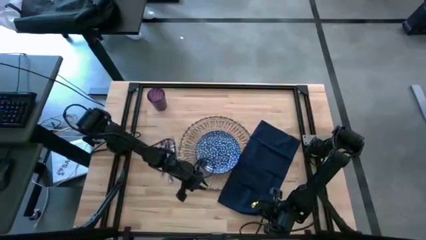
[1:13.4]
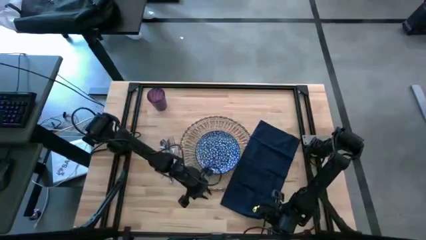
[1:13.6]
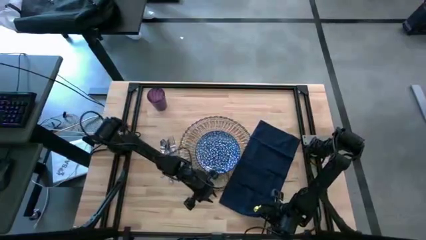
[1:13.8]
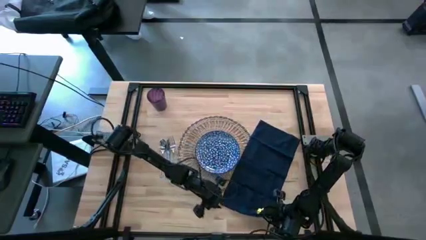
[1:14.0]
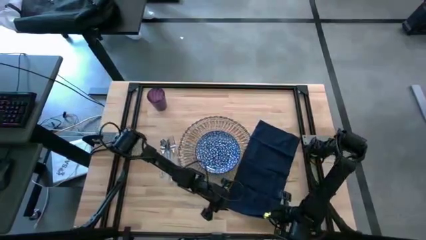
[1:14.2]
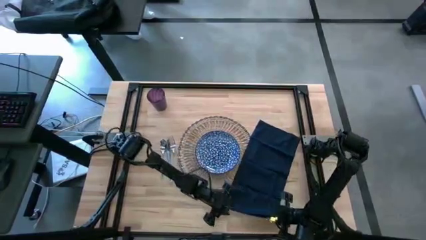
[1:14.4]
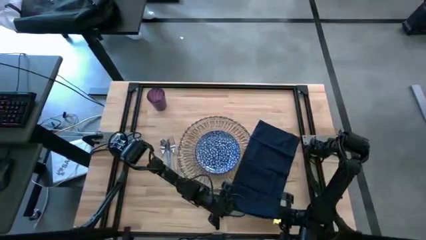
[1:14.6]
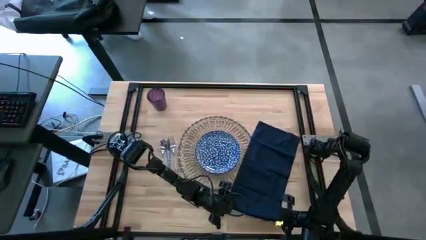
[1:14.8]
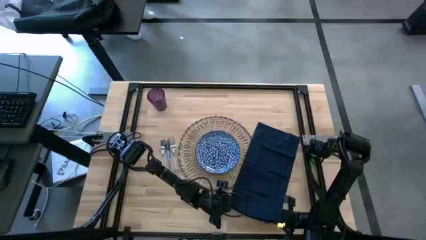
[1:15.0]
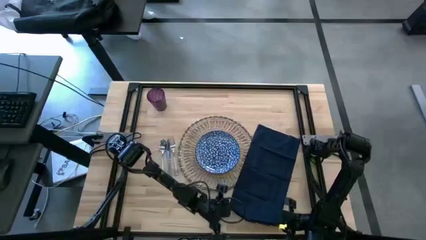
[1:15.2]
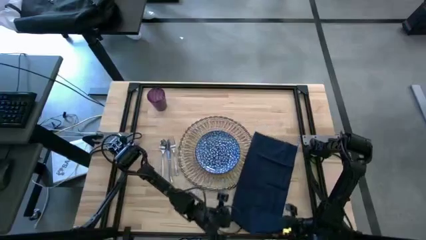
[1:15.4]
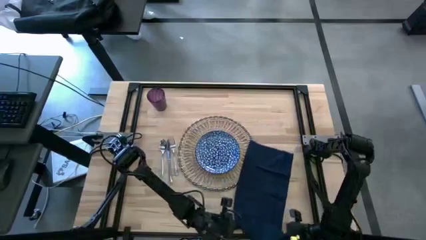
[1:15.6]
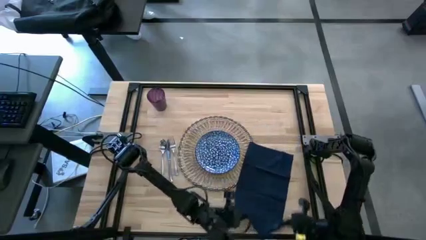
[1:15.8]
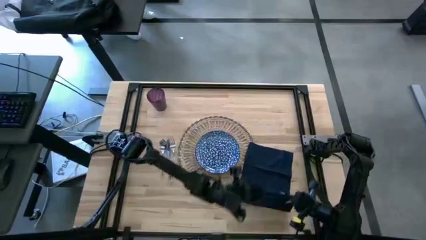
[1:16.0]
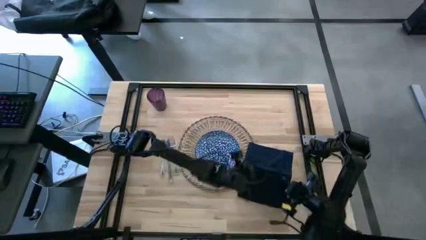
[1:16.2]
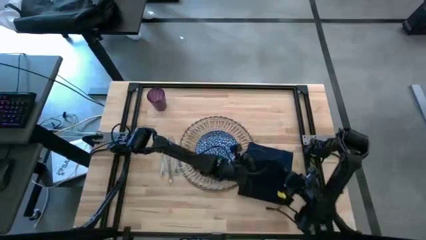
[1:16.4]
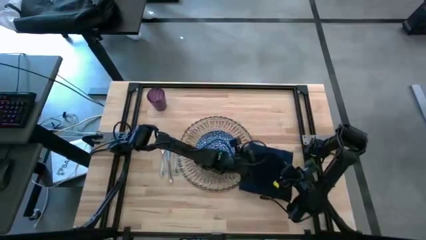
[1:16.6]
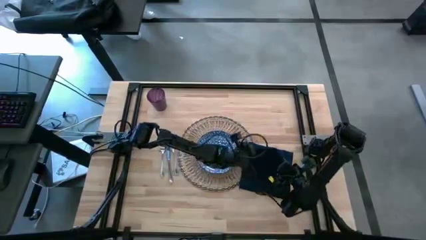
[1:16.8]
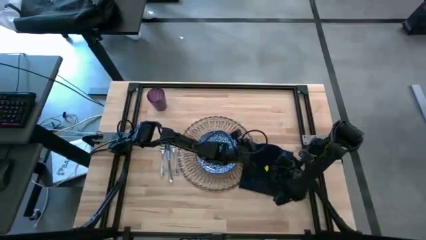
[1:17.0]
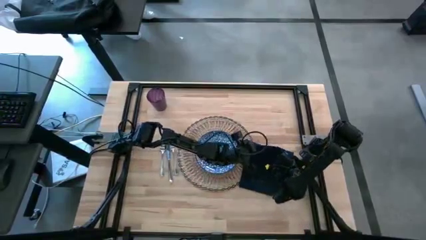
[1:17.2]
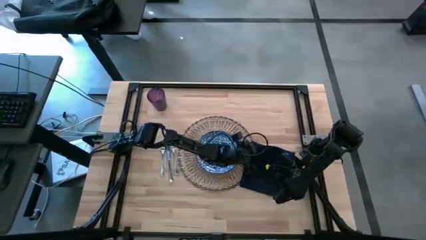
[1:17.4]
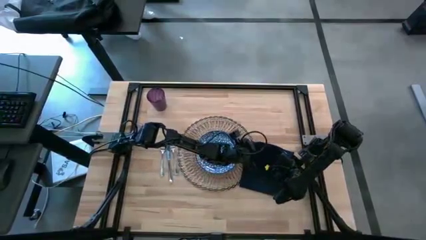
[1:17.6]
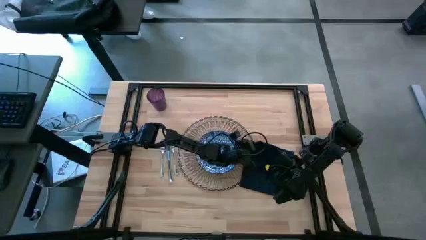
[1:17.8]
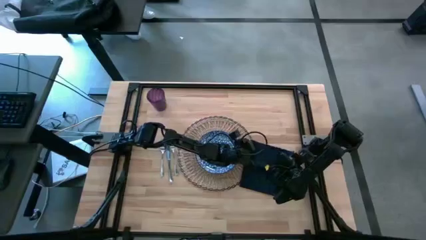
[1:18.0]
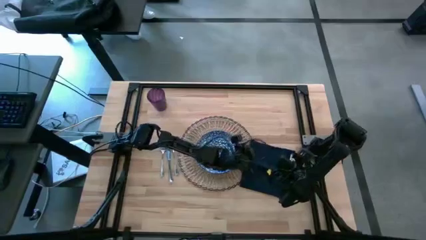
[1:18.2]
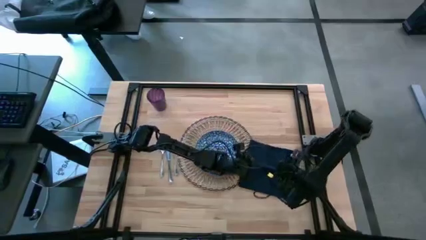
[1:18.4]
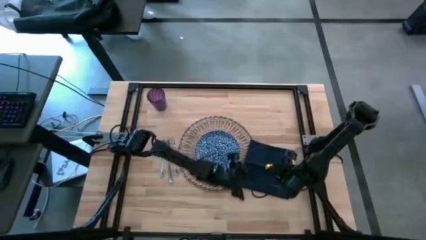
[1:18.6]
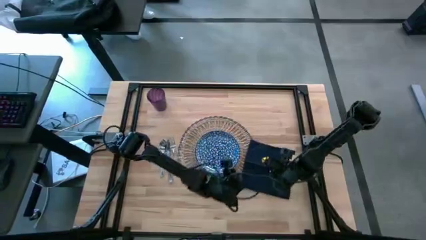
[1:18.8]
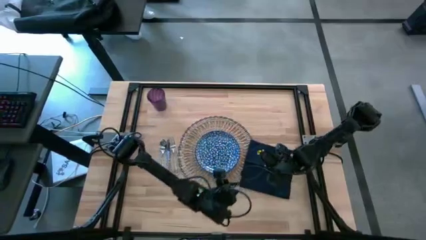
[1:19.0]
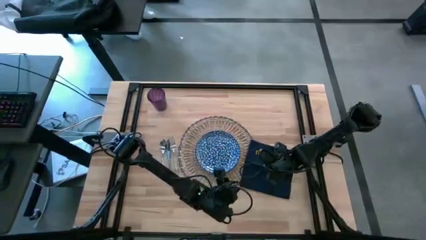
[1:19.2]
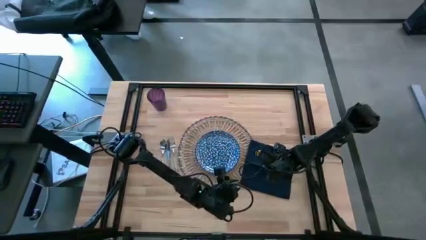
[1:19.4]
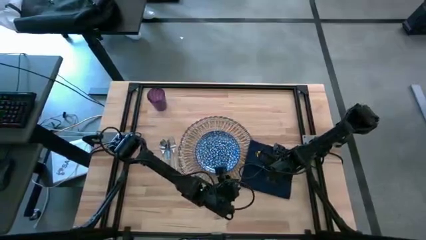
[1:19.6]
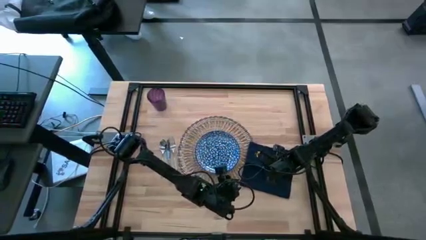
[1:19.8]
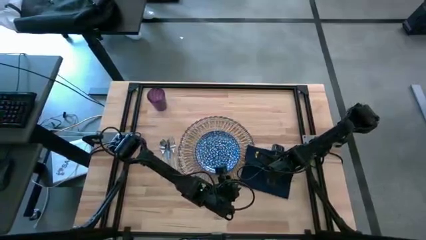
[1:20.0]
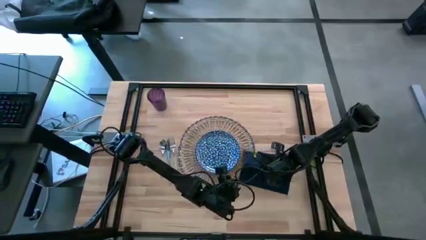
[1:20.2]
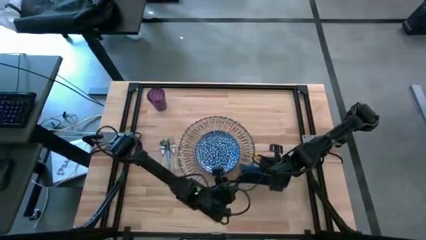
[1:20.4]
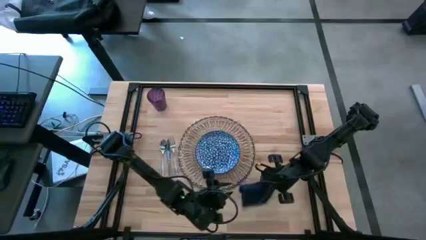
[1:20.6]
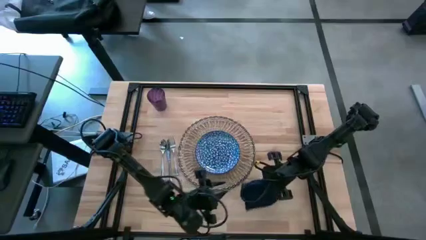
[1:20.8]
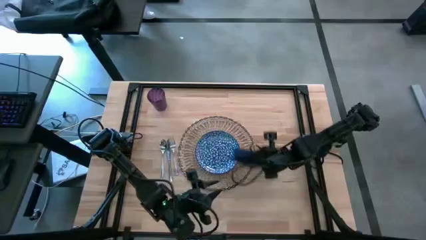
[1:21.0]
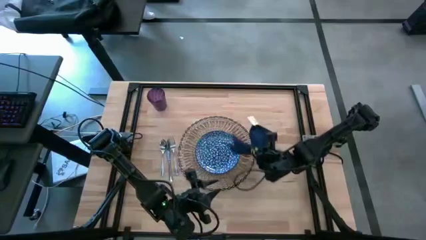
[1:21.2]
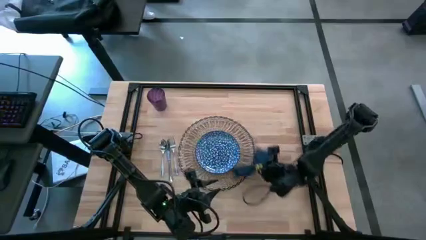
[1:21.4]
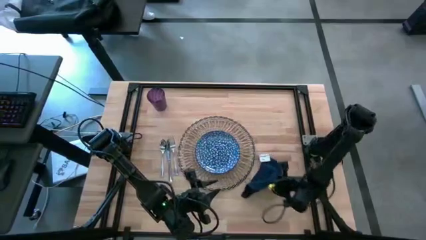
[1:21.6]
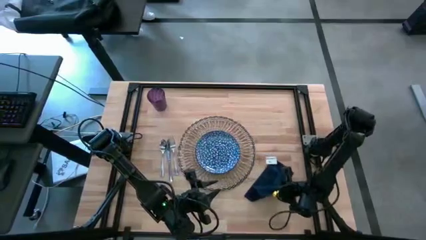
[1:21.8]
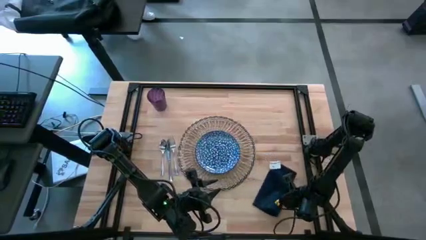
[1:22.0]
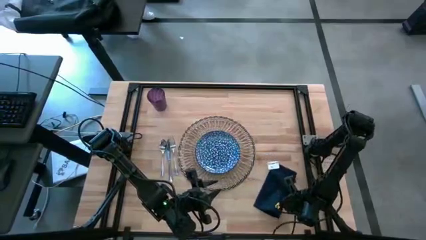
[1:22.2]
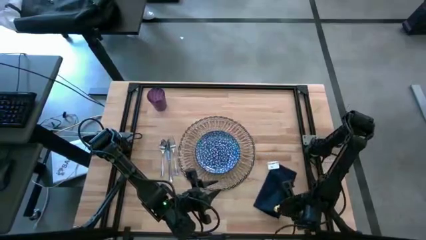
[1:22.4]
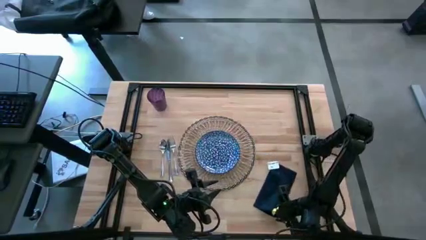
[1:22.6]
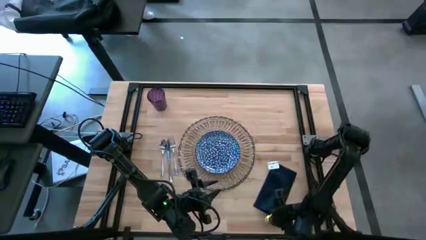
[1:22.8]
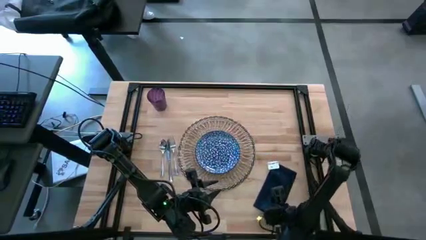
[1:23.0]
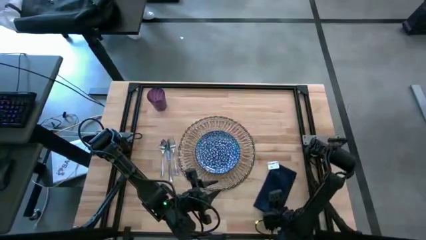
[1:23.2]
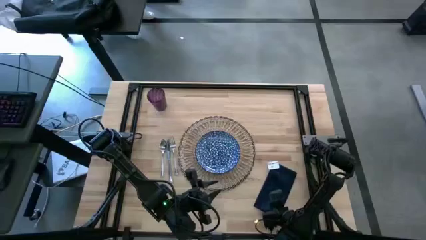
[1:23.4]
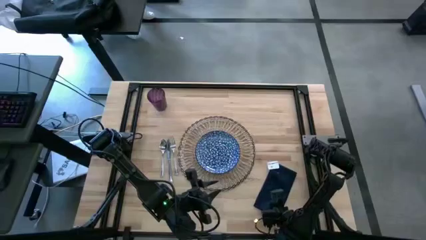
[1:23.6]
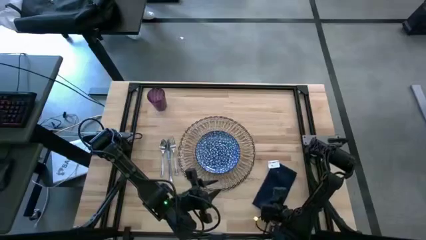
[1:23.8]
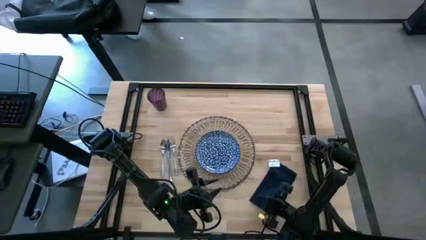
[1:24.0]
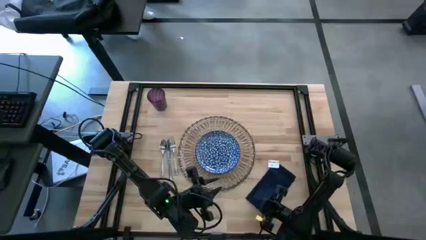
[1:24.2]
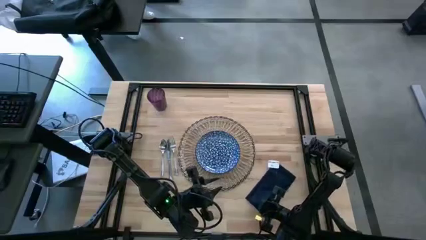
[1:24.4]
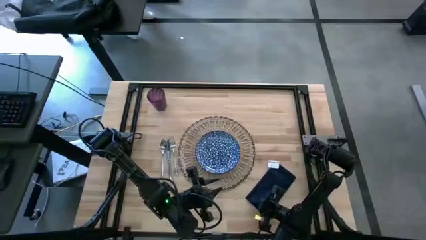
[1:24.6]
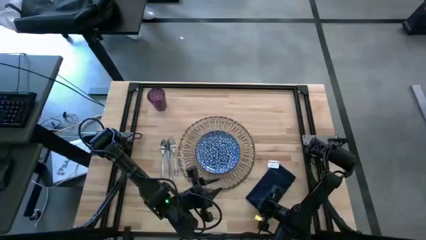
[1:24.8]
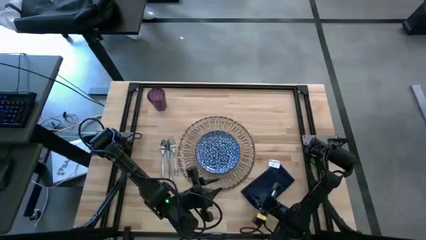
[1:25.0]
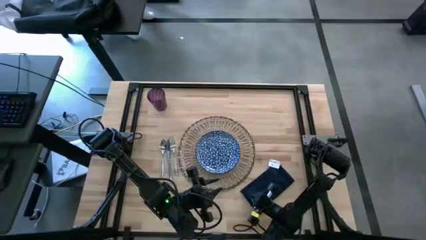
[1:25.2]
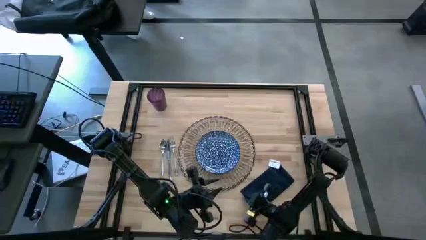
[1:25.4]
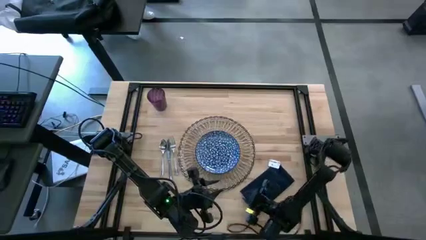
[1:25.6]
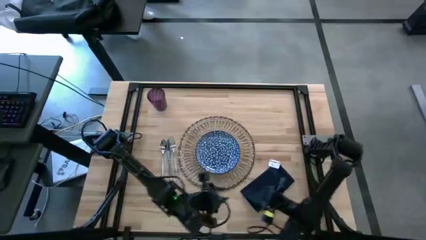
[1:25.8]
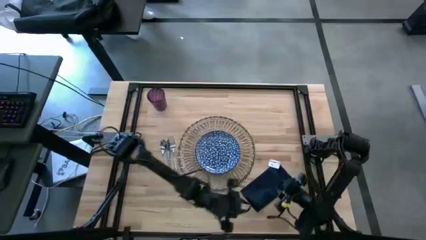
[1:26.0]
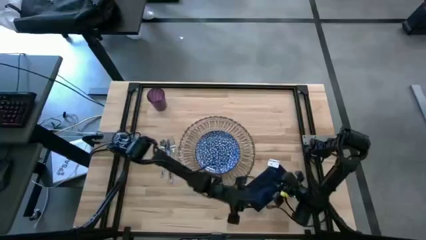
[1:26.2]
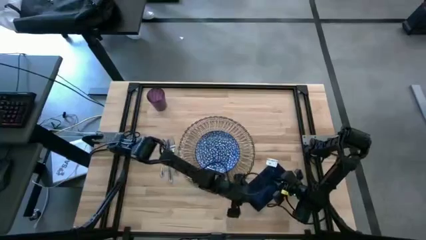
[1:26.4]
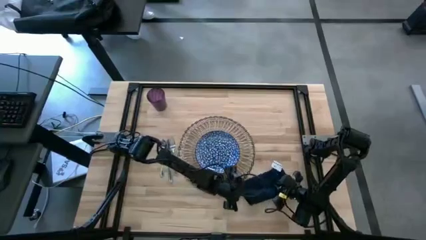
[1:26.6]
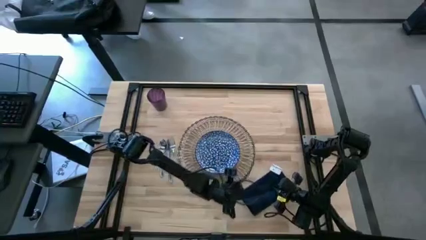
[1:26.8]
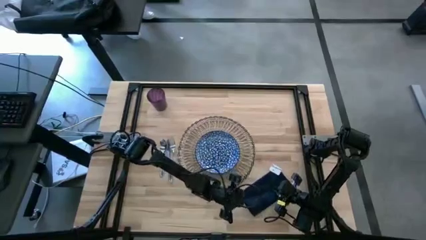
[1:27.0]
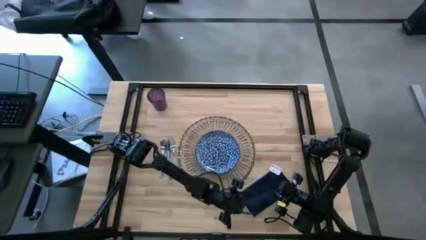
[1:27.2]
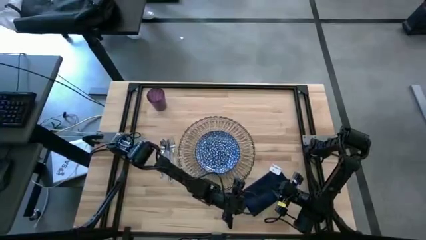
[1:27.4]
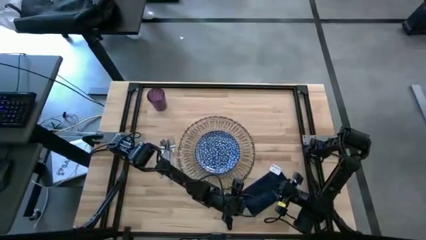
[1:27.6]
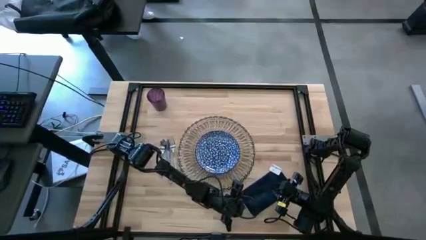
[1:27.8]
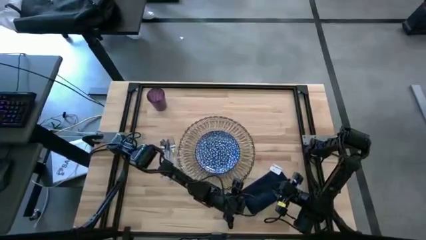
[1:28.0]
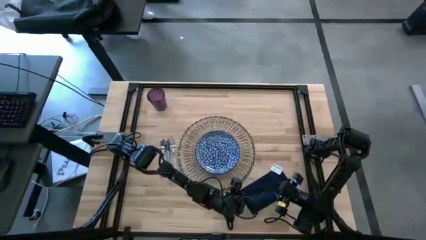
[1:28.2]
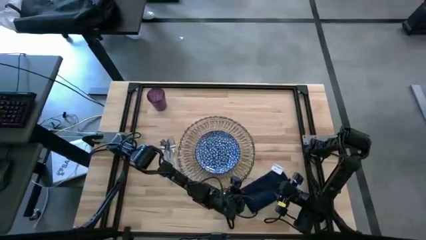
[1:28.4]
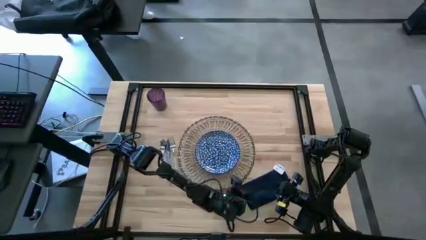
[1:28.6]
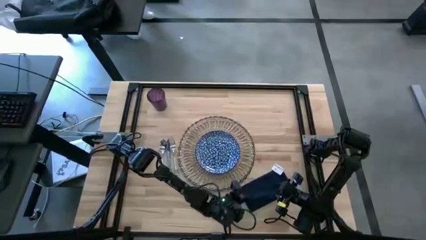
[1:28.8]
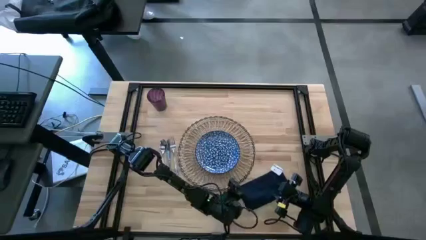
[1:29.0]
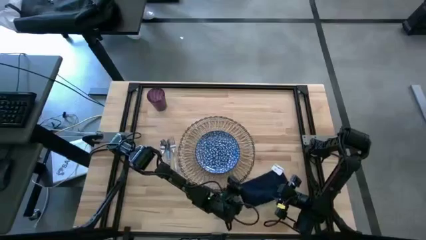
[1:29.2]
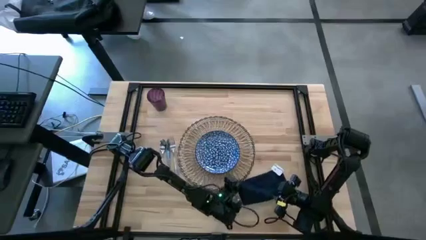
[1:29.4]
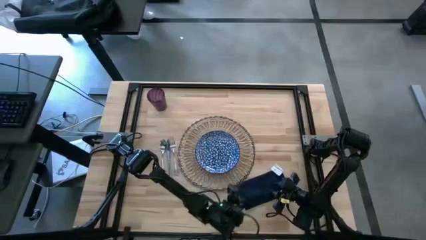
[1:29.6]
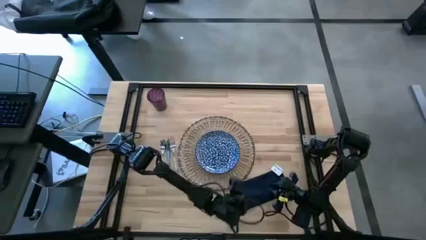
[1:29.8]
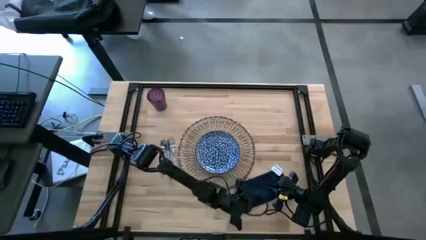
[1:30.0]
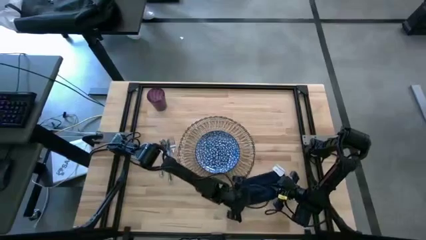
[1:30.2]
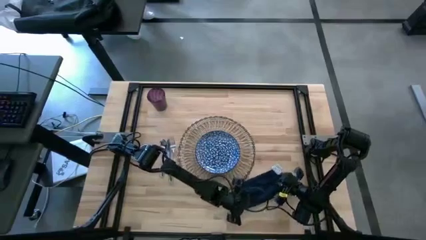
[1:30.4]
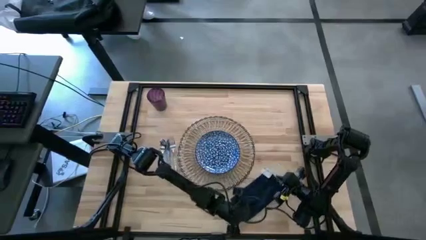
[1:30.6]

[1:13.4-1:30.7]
Task: Set table place
Fold the blue napkin
